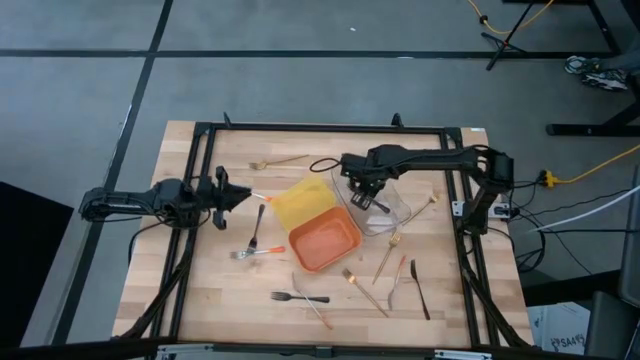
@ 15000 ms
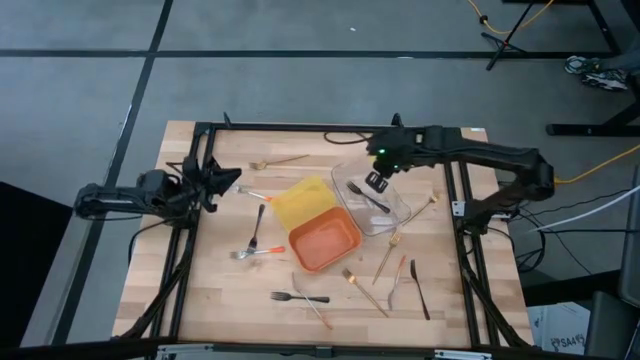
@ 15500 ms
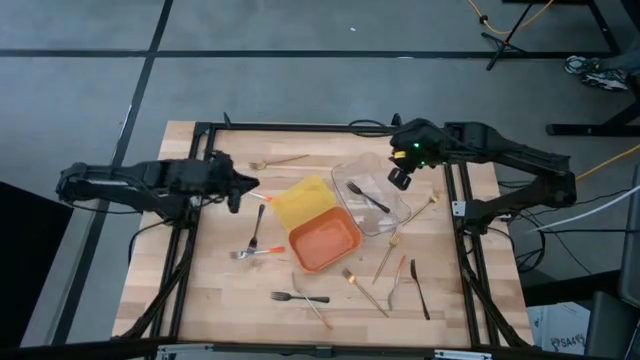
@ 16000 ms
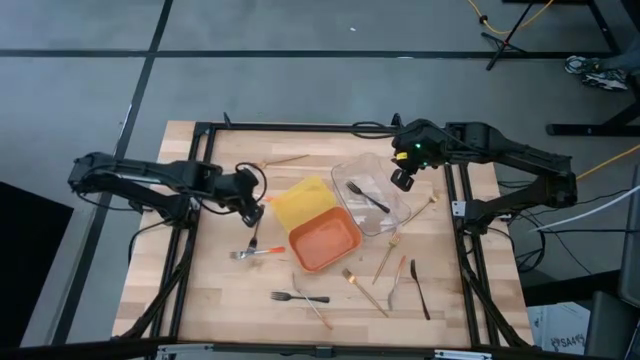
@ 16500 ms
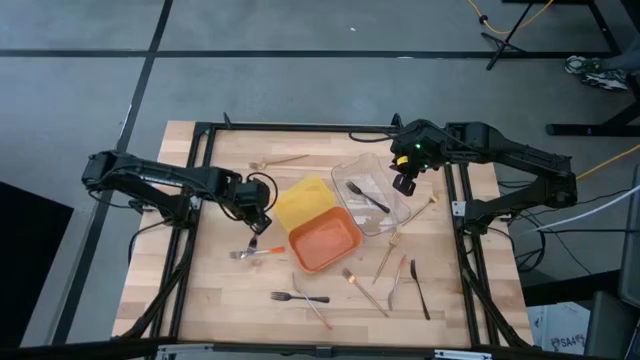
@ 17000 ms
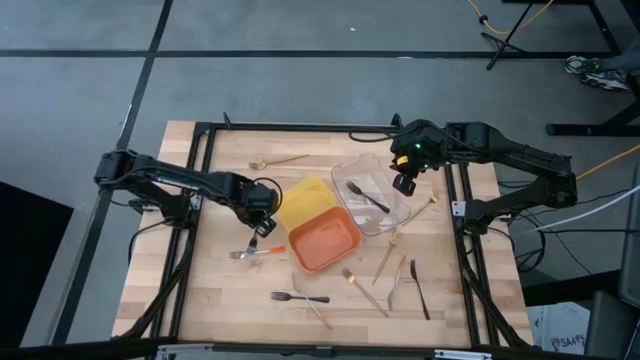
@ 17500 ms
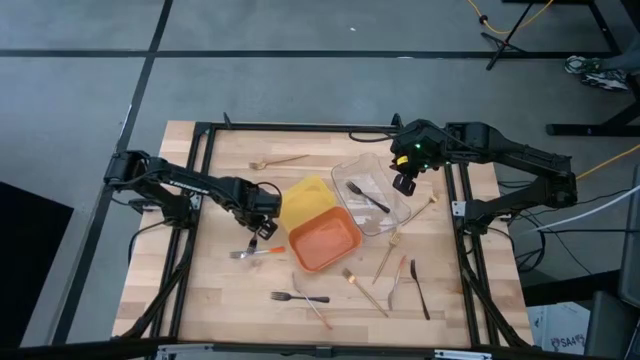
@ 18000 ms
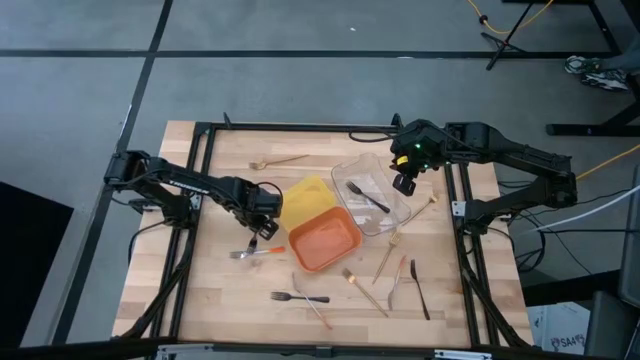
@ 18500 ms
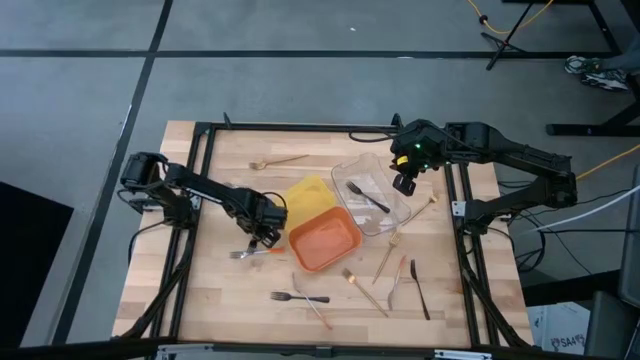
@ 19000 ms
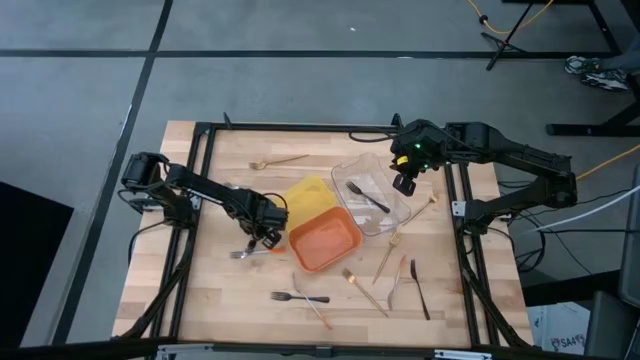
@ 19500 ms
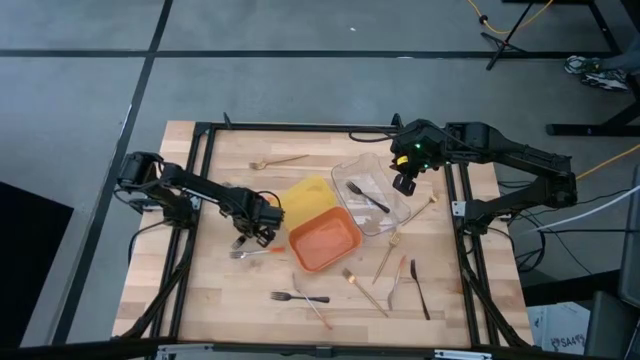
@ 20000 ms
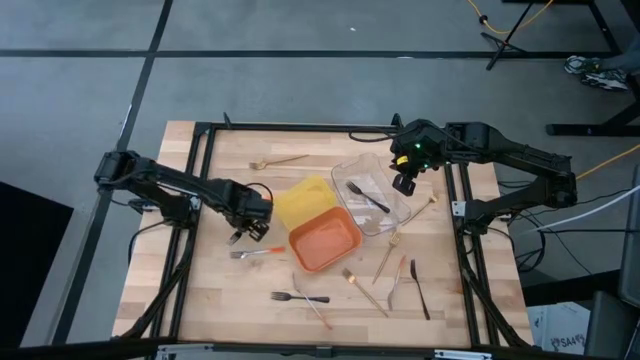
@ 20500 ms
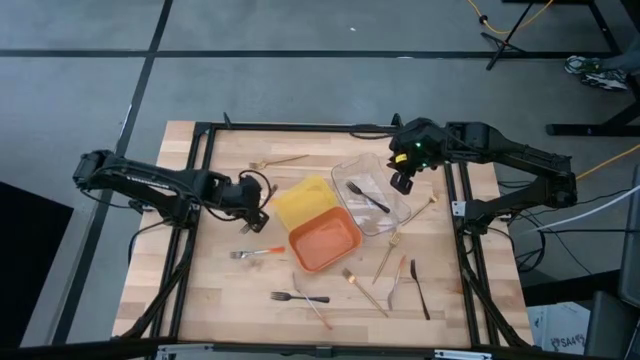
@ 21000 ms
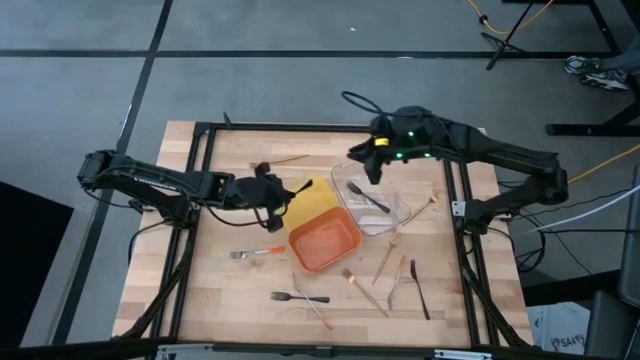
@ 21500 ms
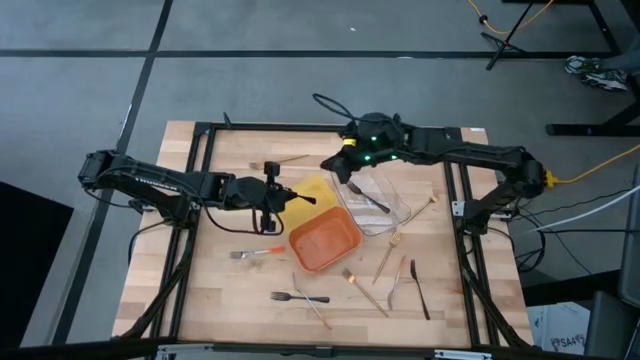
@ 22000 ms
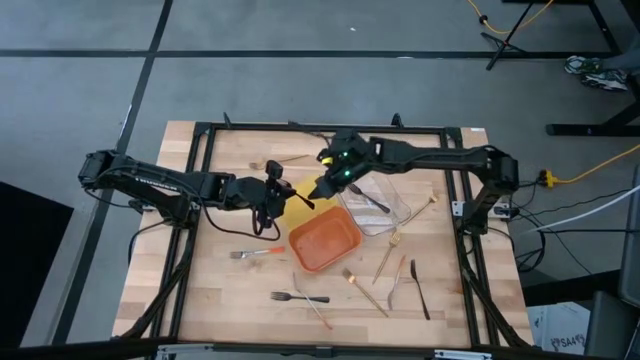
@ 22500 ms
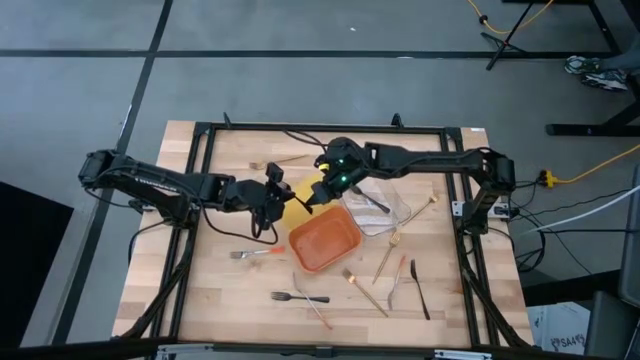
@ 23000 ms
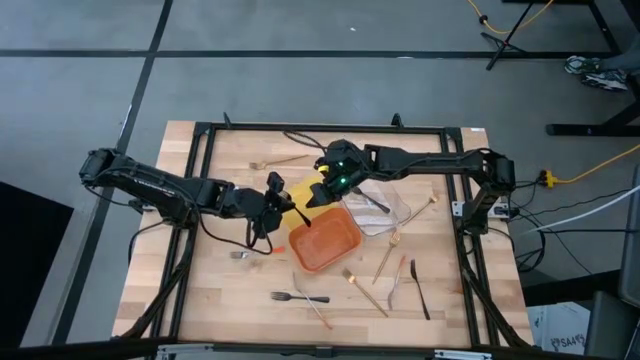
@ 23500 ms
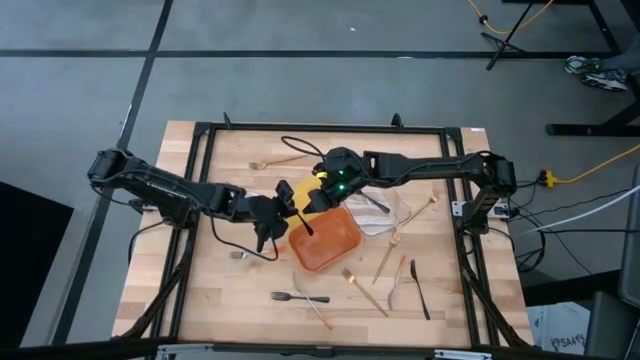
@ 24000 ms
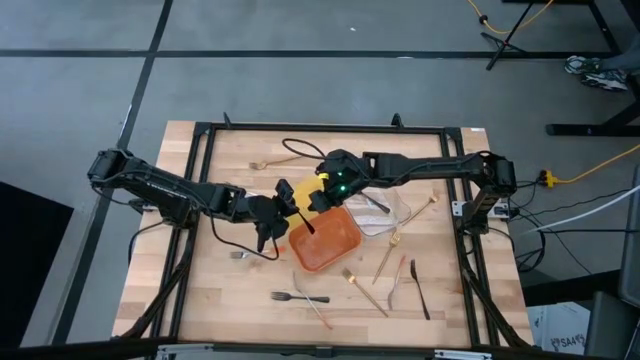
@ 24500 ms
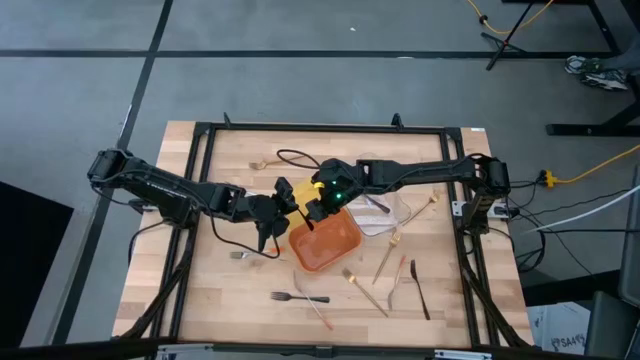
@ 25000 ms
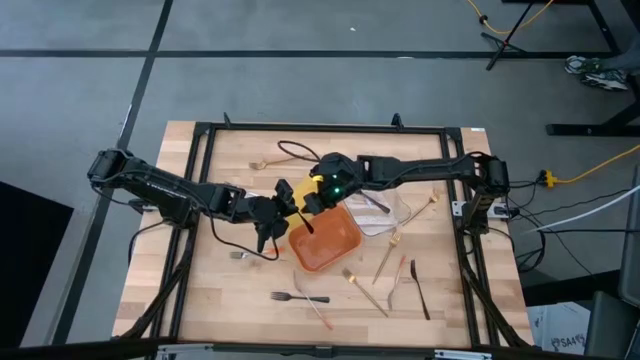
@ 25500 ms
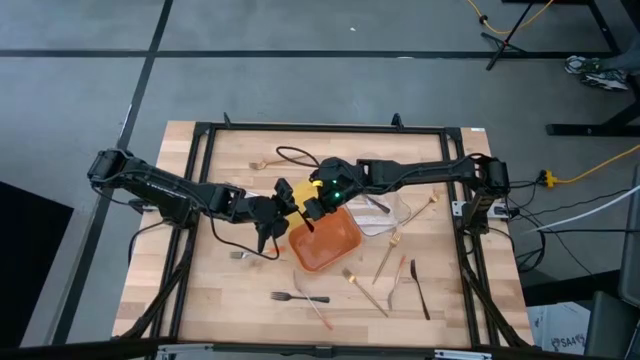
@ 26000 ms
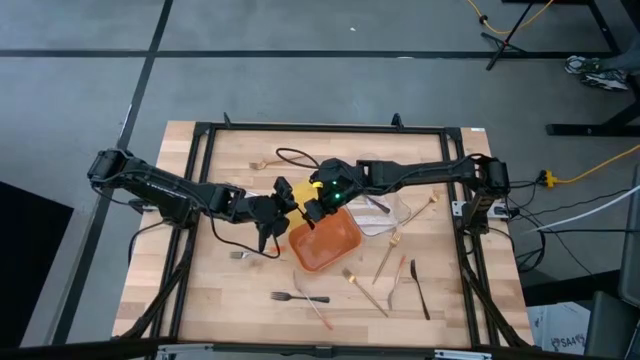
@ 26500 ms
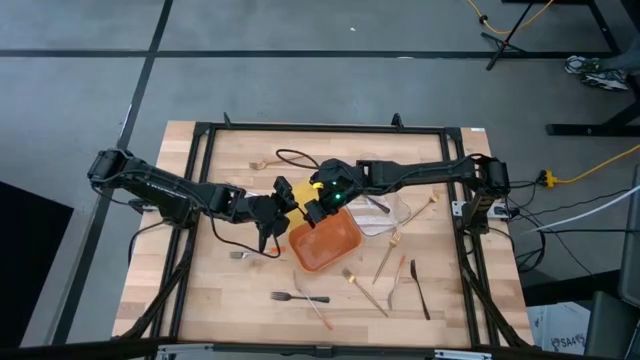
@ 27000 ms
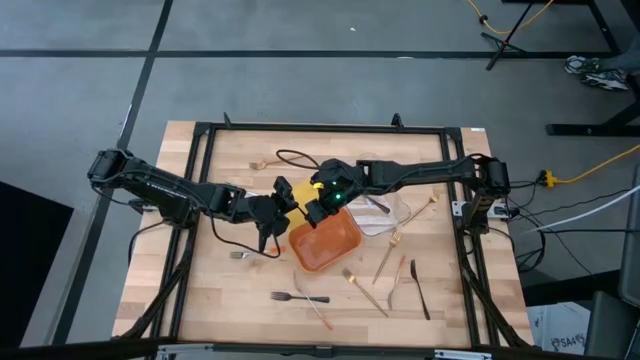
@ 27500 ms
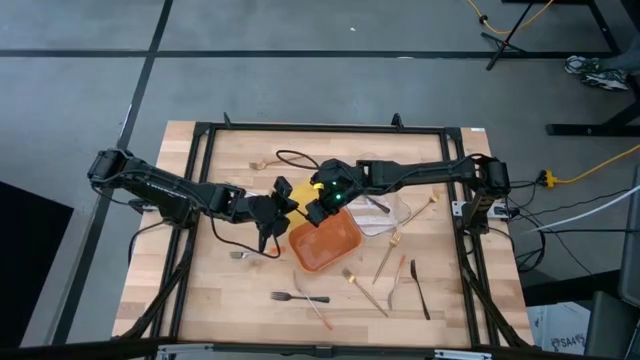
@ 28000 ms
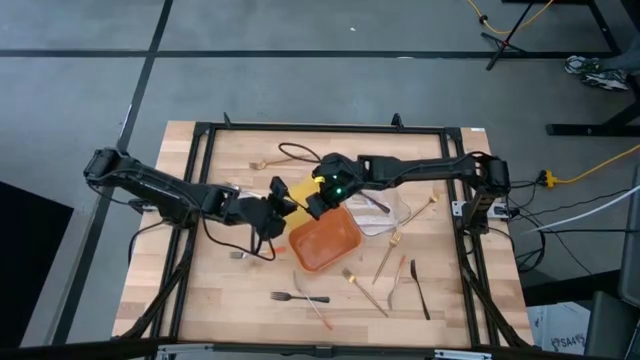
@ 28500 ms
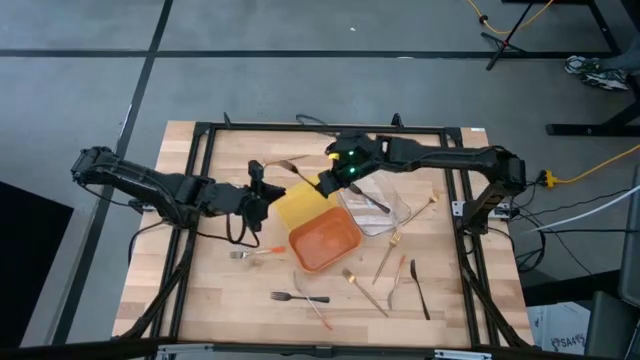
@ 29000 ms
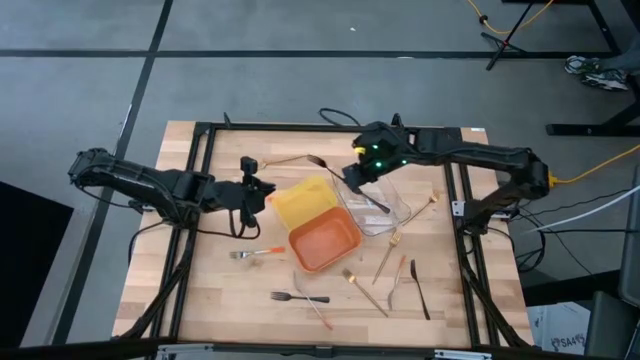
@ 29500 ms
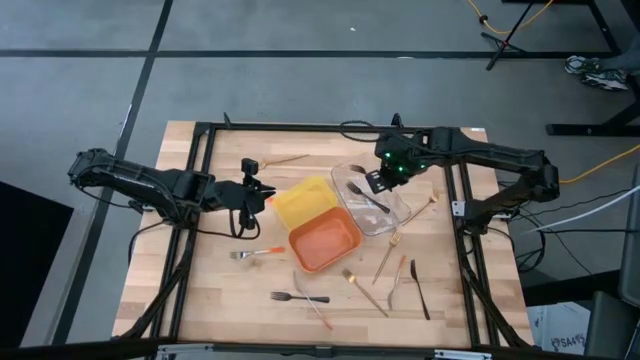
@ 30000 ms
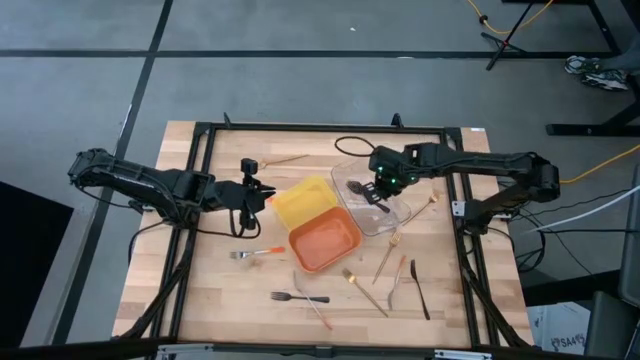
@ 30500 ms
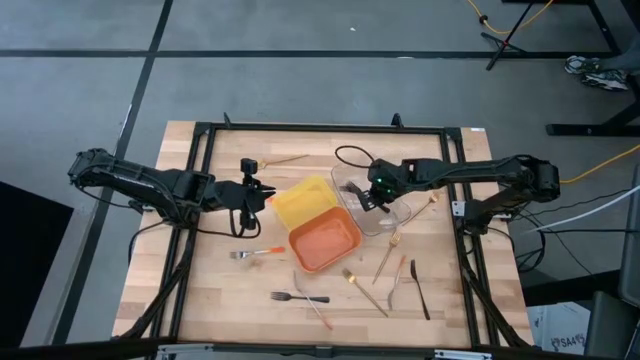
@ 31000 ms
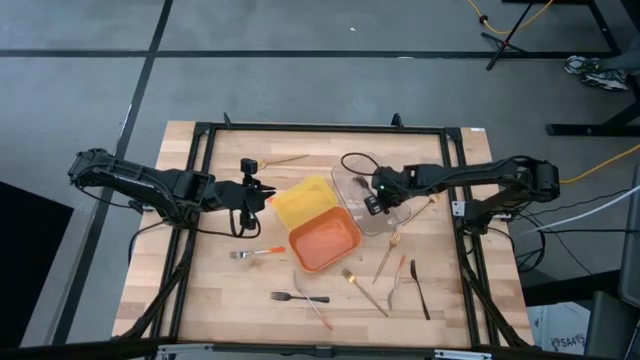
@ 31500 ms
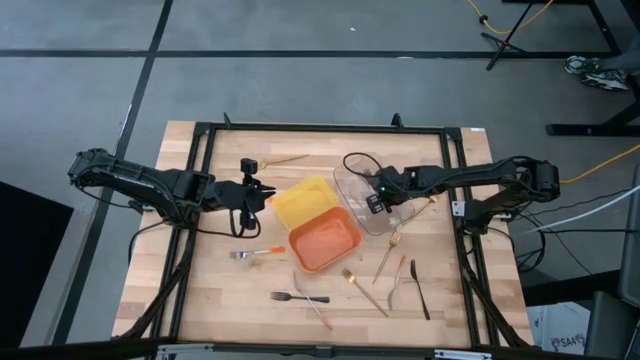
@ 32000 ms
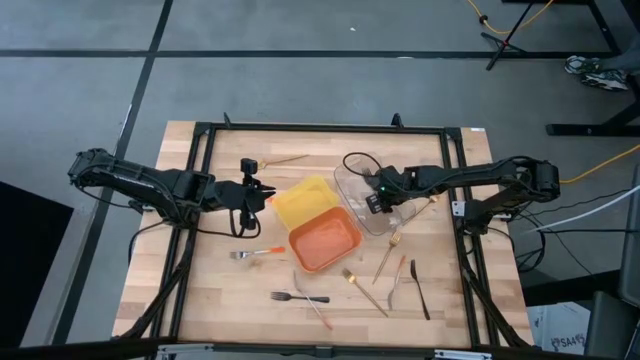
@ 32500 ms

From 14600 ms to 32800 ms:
Task: Sort silverware by color (type)
Put the black fork into the transparent bin
